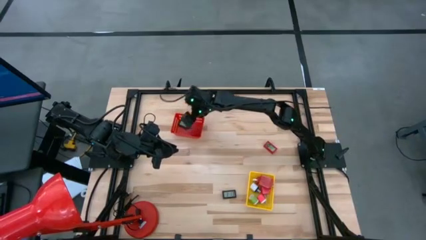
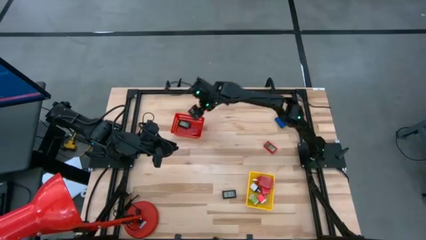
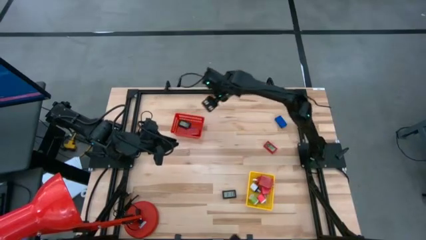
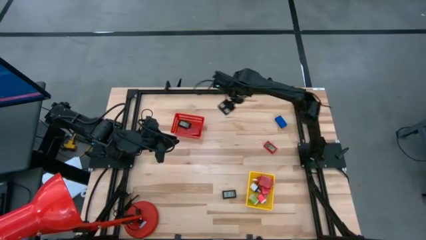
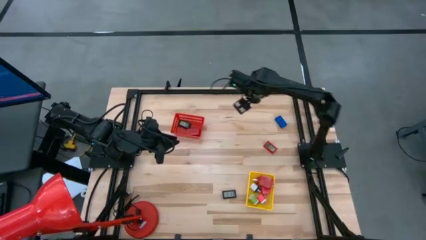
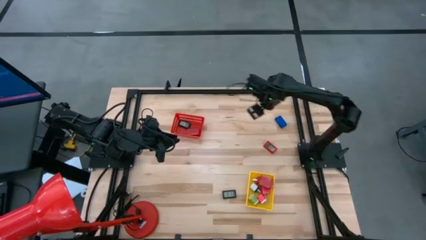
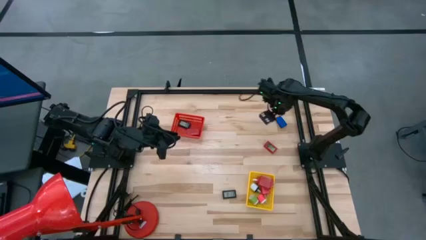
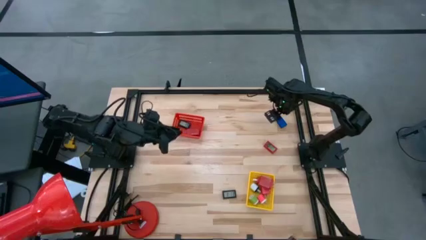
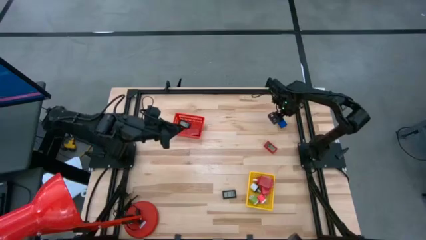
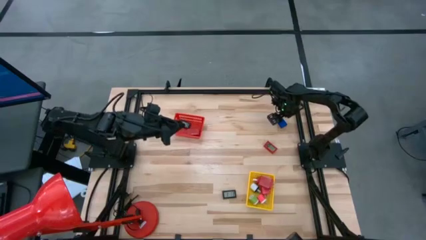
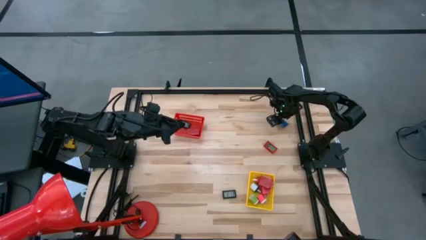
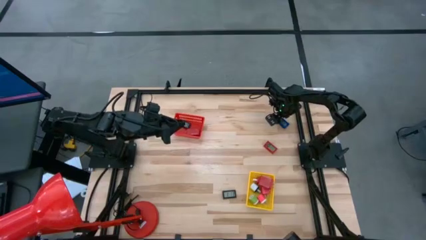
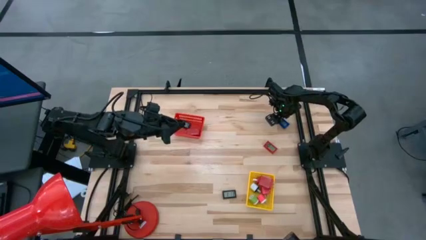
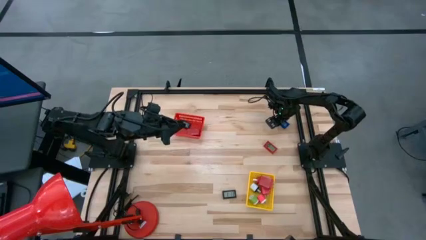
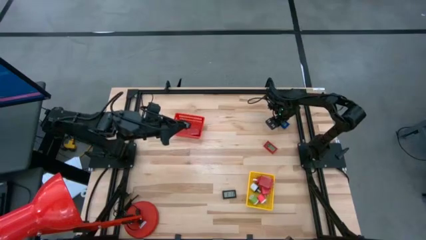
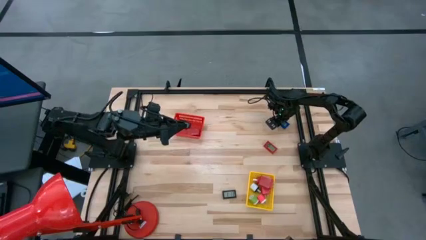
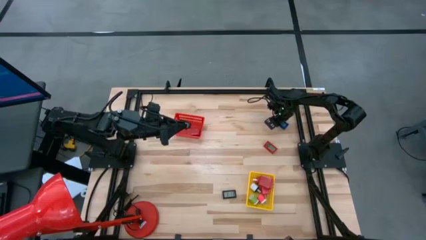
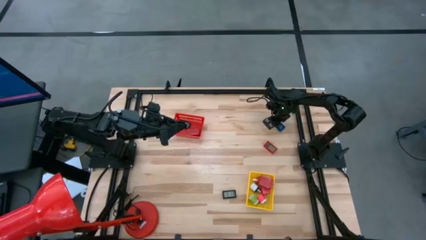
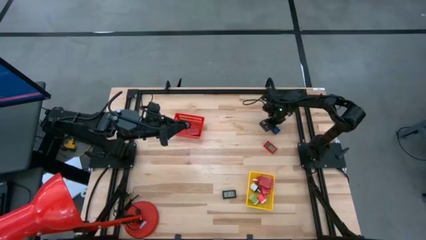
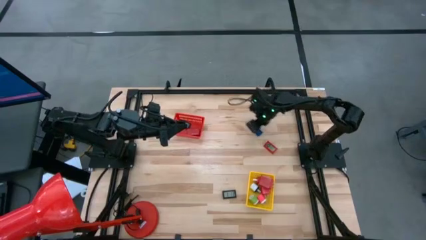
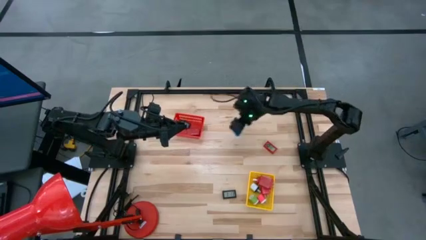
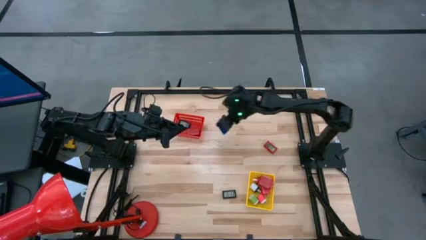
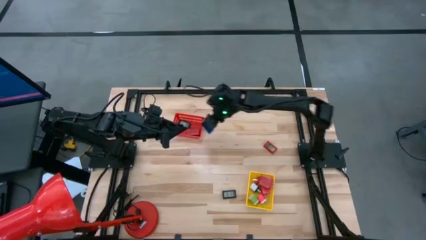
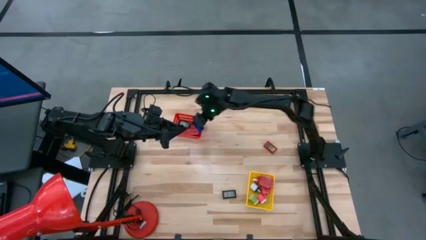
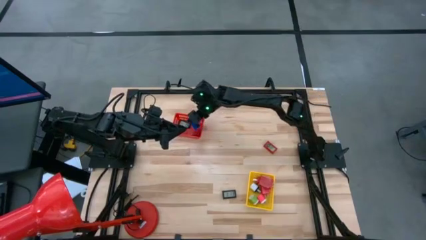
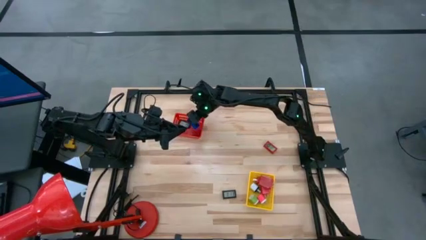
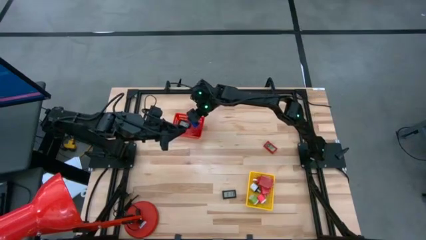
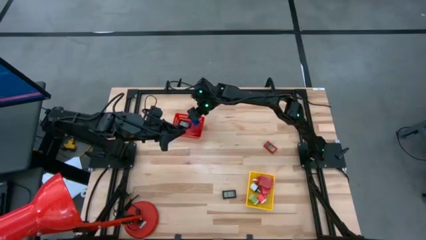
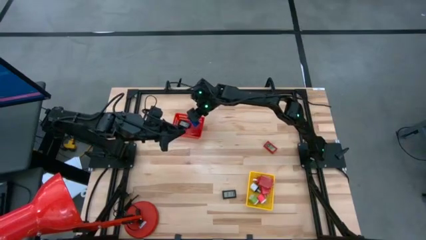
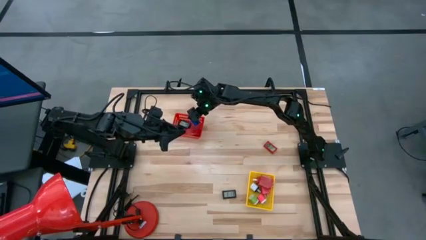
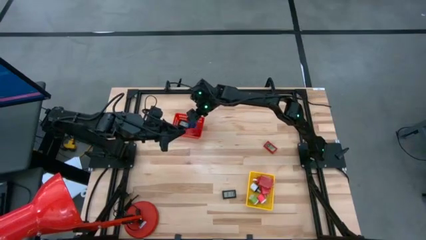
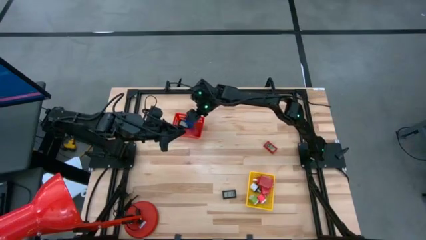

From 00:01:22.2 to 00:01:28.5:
Task: Pick & Place Office items
Put the blue digital clock into the red basket

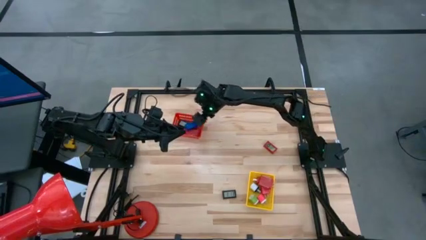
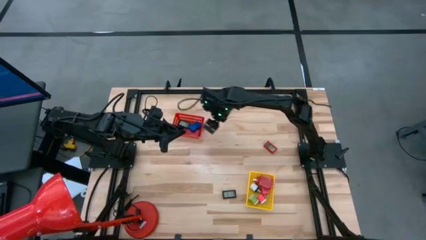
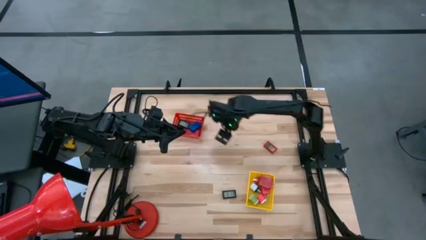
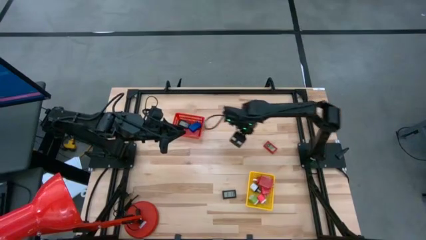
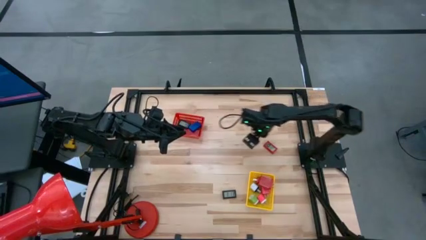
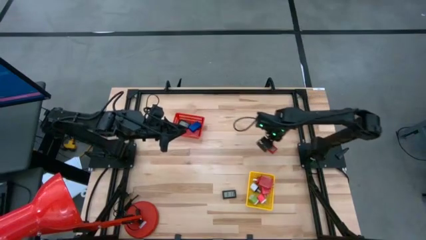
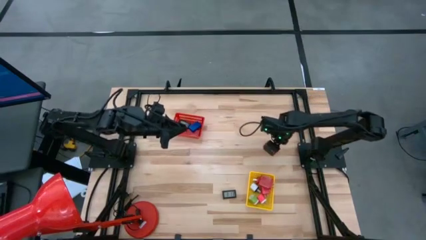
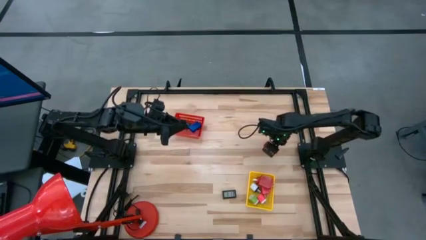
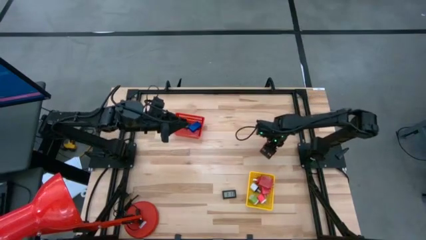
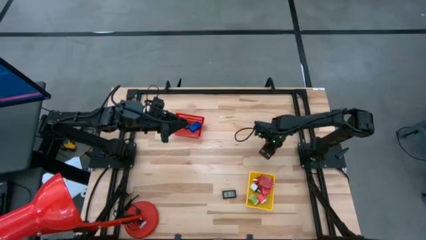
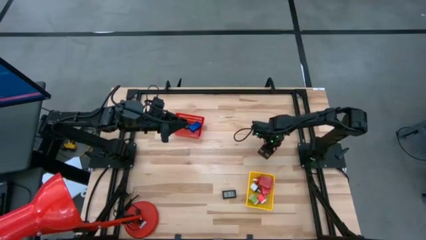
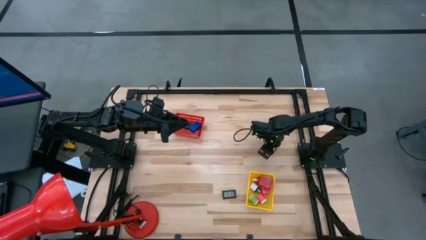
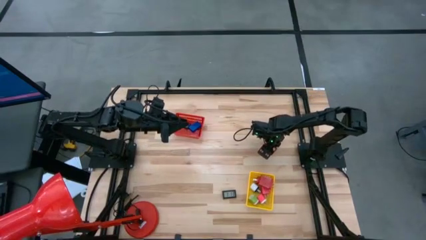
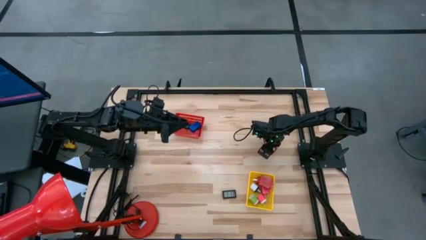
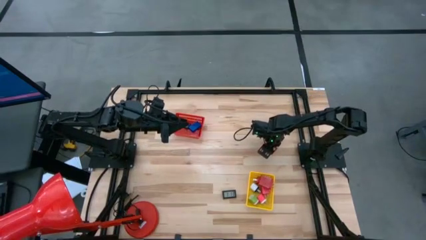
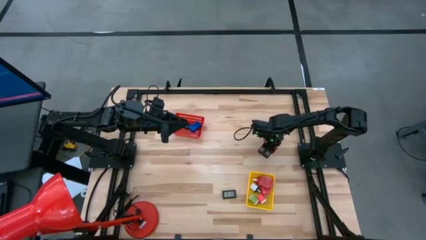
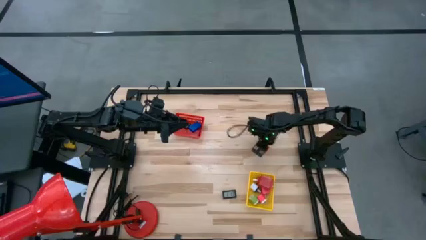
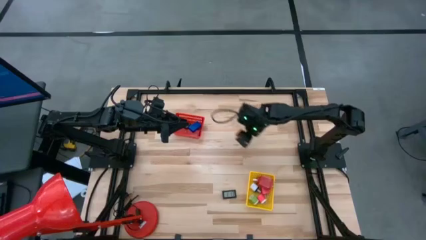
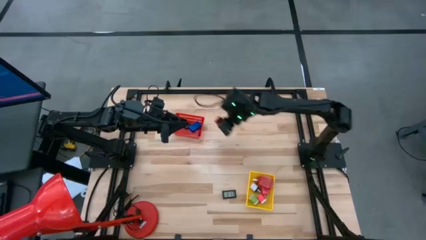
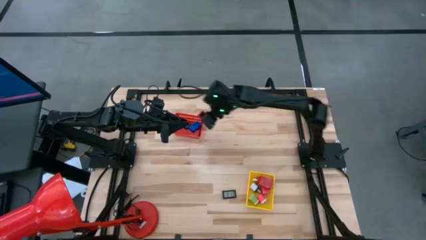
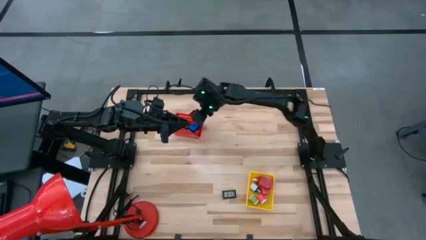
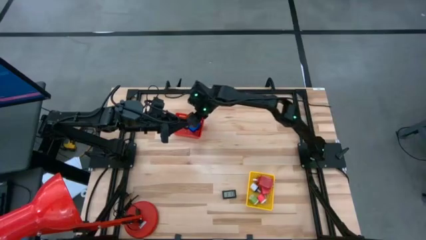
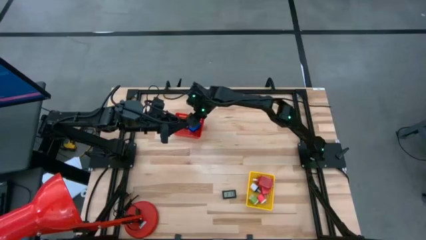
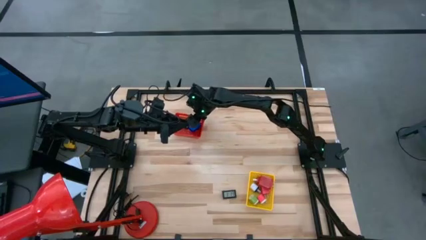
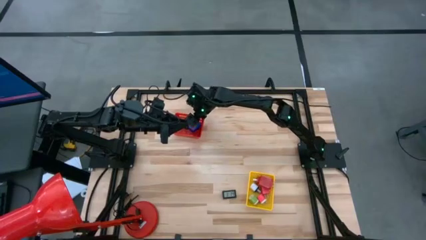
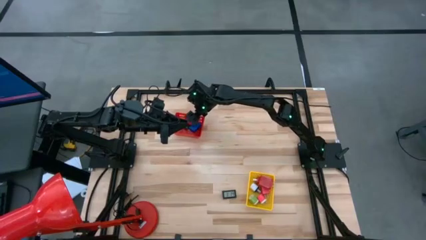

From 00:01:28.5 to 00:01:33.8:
Put the red digital clock into the red basket

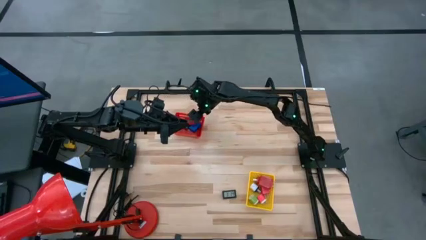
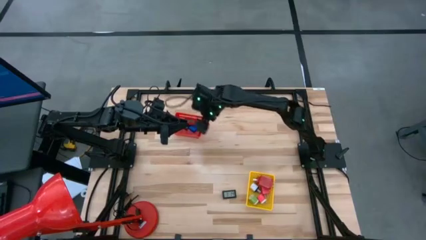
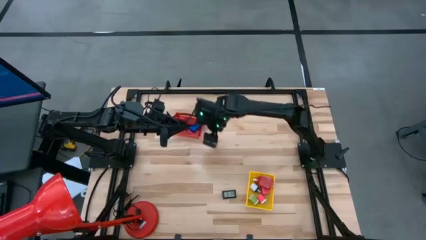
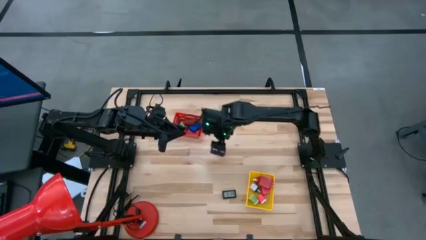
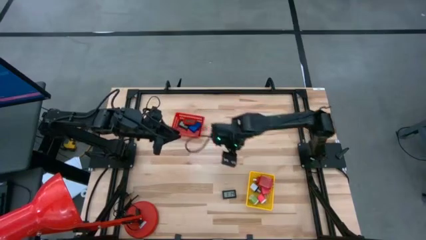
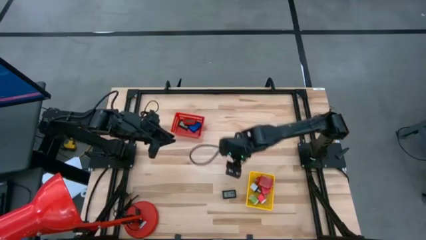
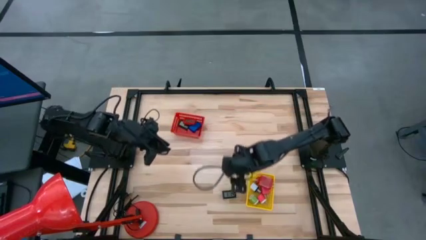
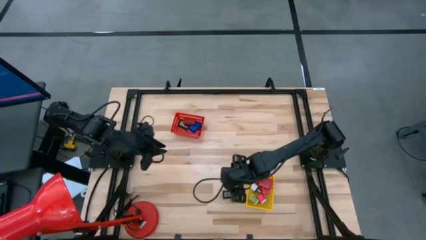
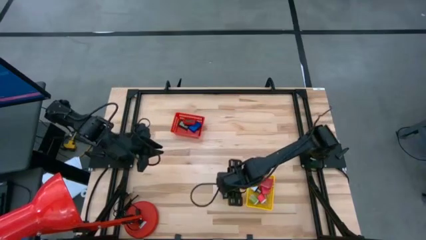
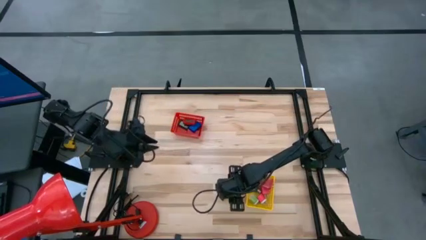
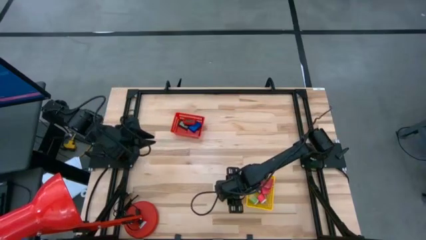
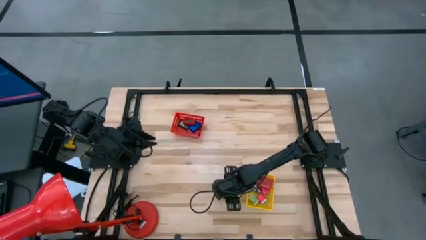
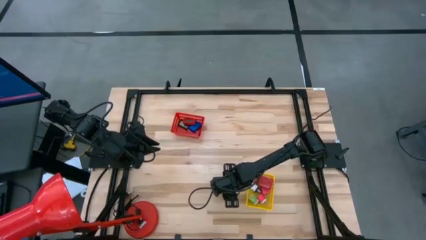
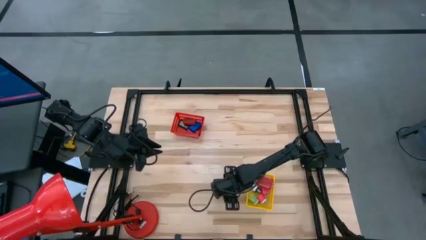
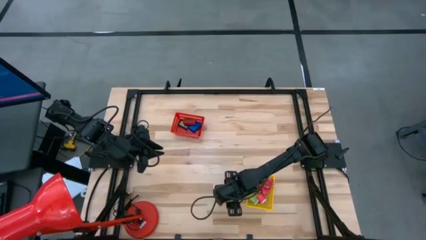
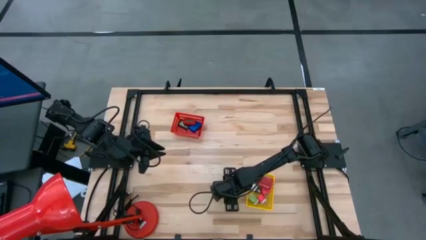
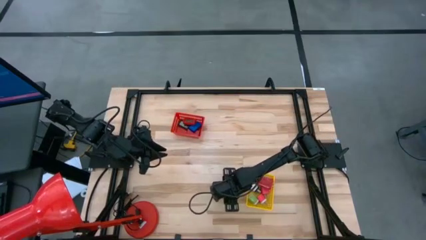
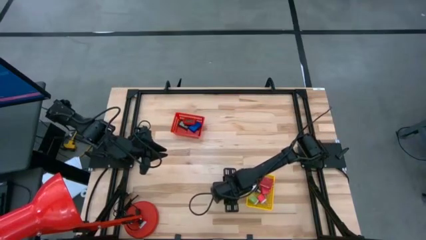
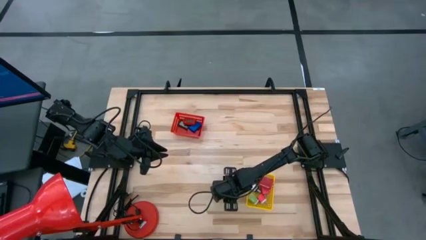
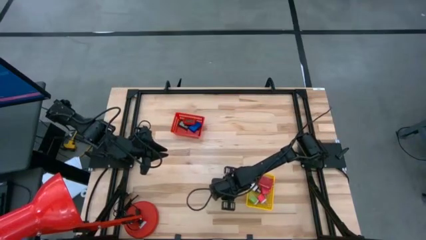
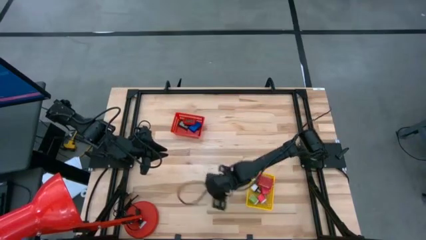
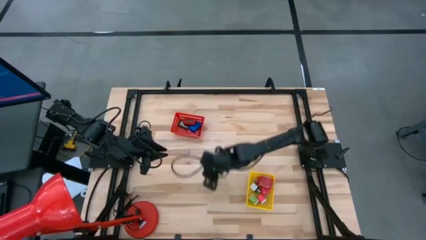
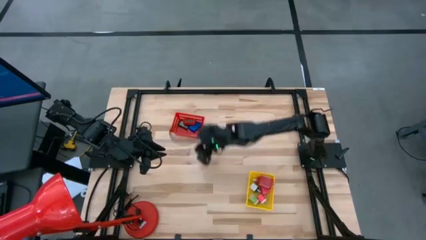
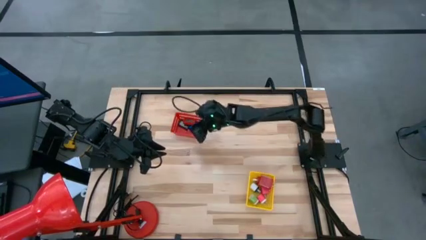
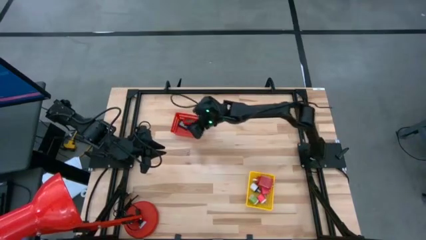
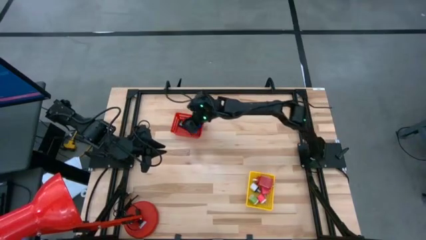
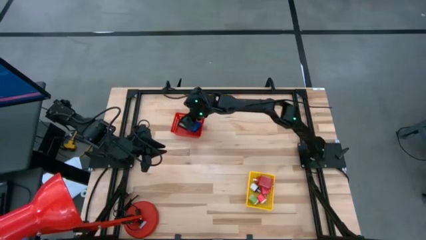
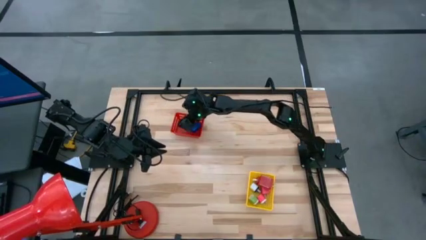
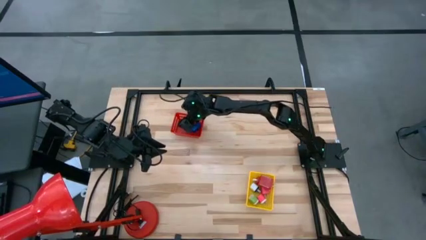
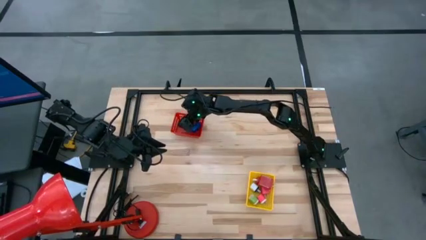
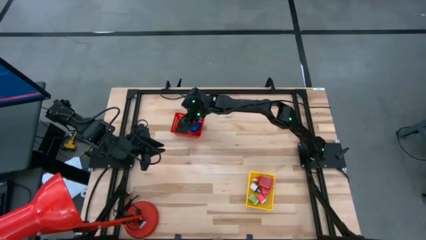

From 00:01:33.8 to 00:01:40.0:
Put the black digital clock into the red basket
